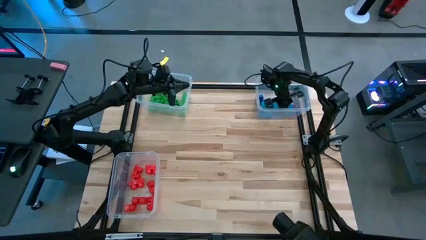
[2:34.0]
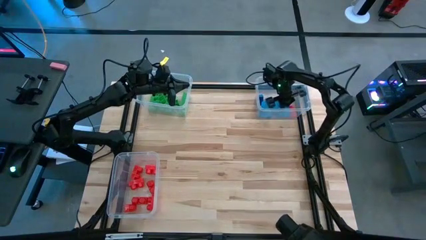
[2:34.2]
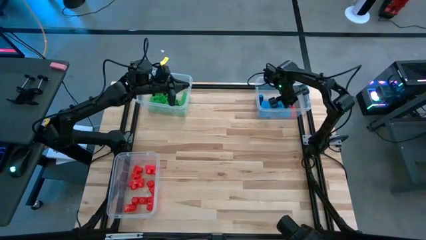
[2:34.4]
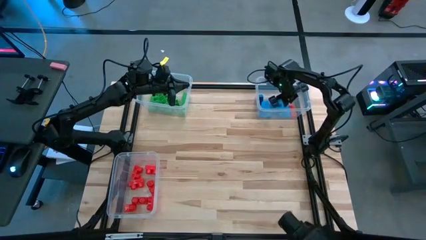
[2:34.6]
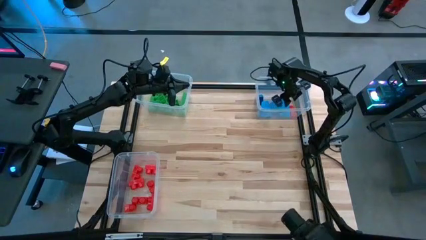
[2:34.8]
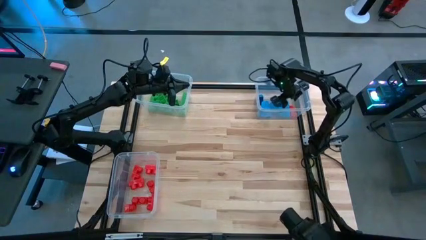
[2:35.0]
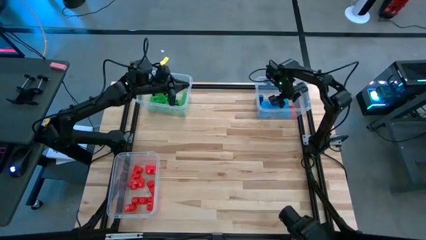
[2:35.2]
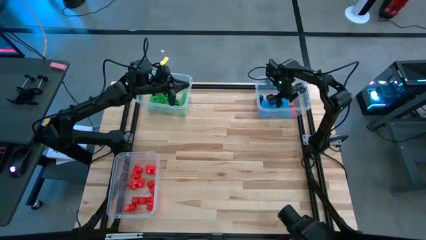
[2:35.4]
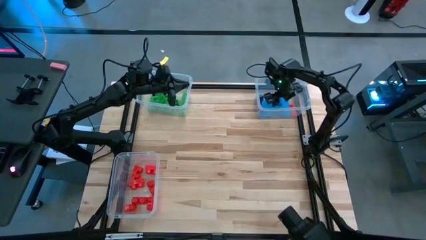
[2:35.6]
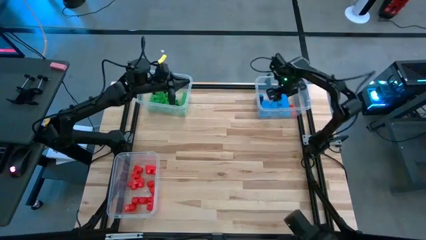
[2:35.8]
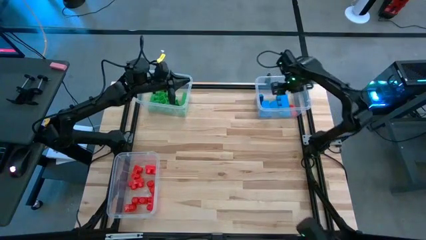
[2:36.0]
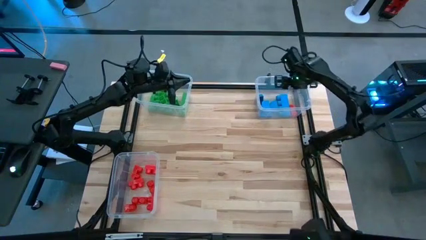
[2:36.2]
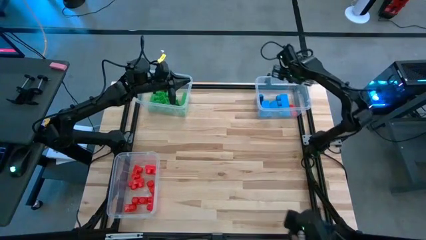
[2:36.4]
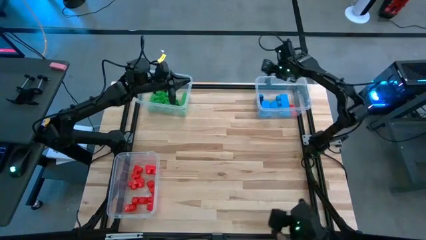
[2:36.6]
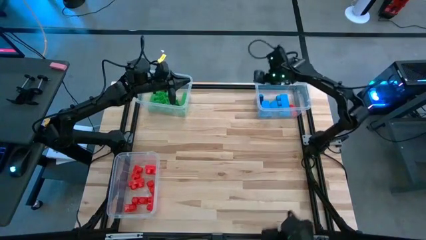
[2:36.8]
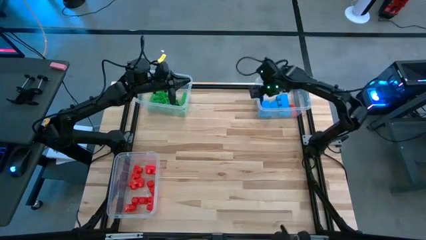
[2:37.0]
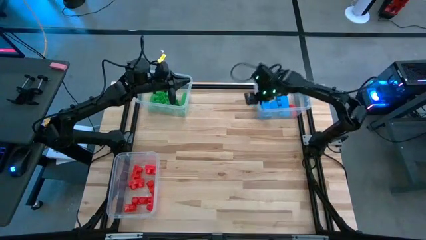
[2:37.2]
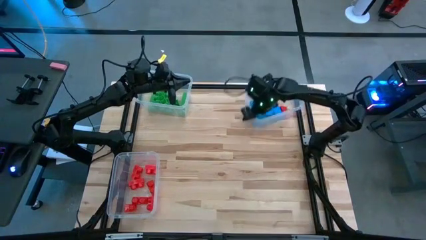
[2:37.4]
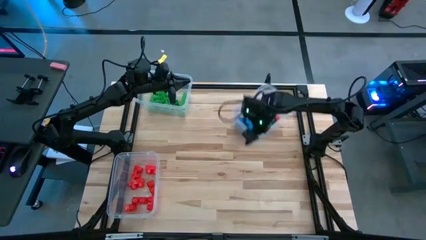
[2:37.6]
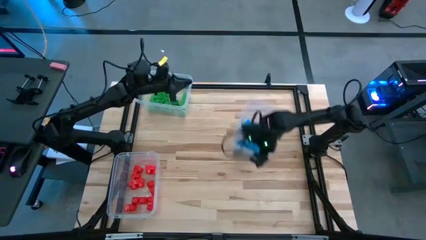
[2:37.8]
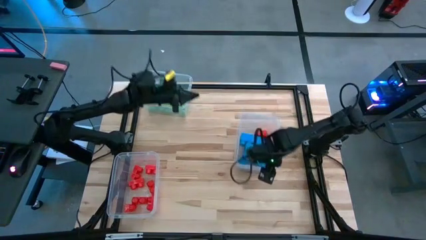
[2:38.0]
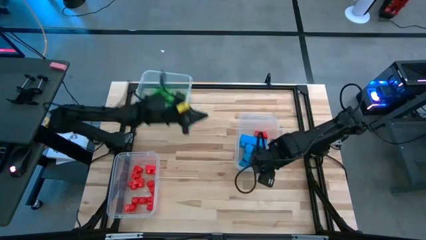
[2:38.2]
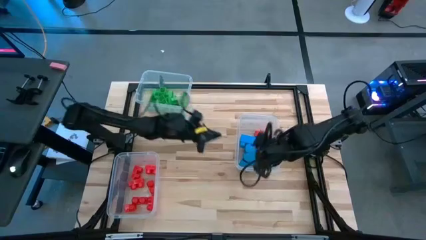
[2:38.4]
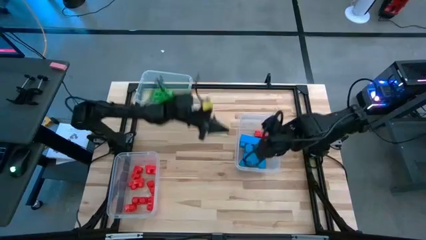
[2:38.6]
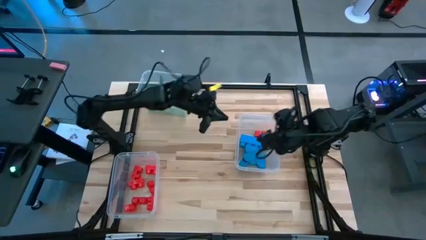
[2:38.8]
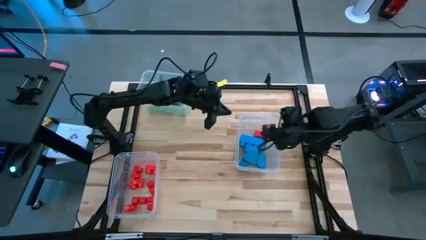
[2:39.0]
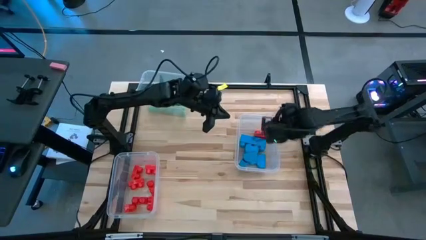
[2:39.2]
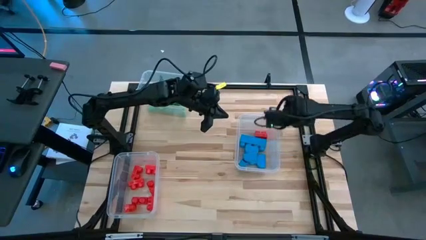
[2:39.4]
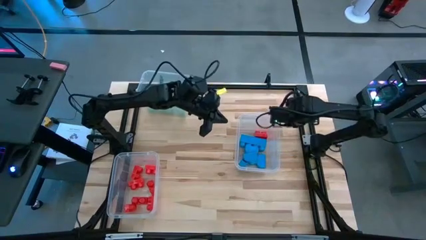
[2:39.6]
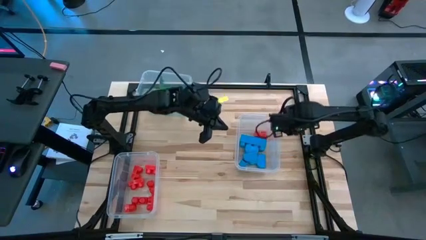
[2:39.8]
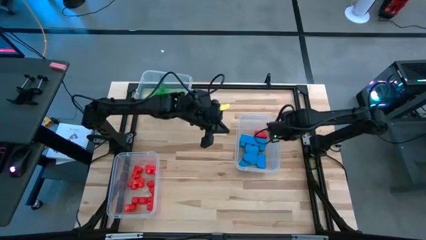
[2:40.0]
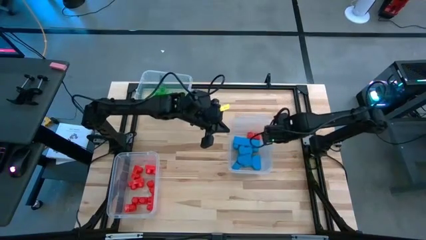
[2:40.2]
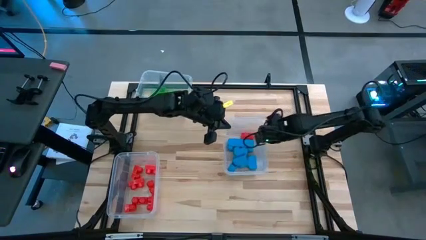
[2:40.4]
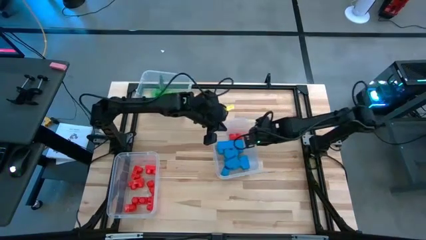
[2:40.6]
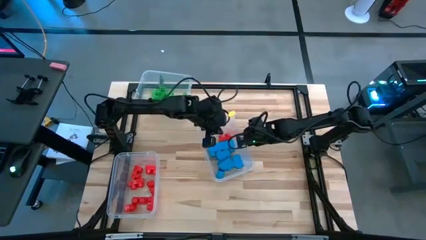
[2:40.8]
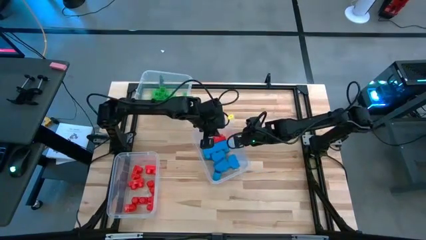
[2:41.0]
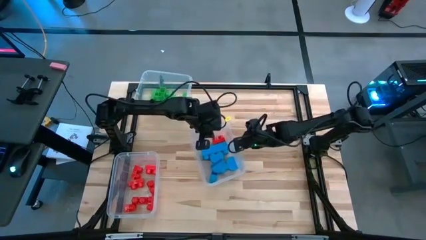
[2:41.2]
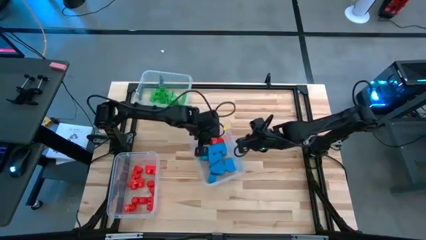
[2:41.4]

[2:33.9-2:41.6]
Task: Sort blocks
Move the top right transparent bin to the center of the table

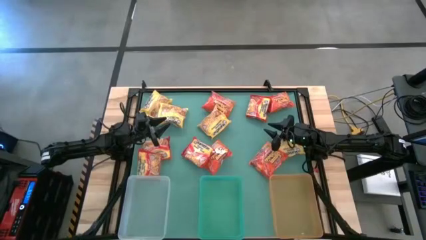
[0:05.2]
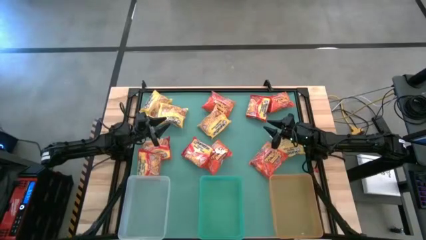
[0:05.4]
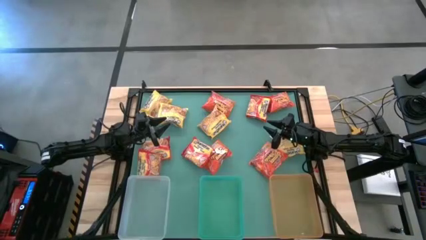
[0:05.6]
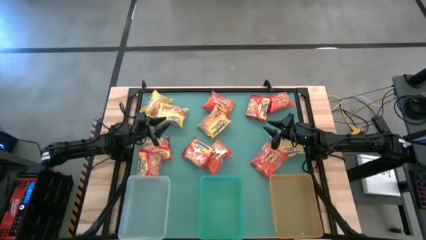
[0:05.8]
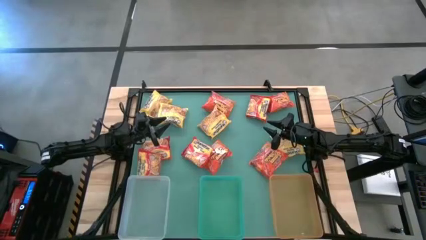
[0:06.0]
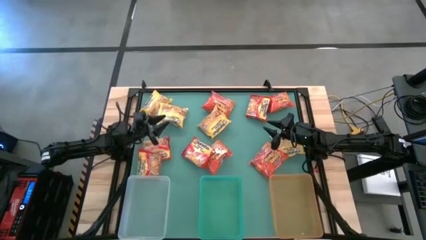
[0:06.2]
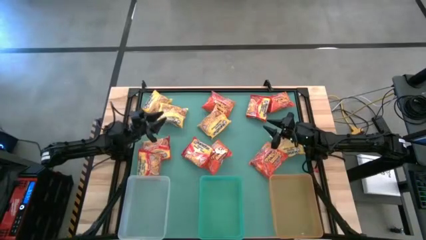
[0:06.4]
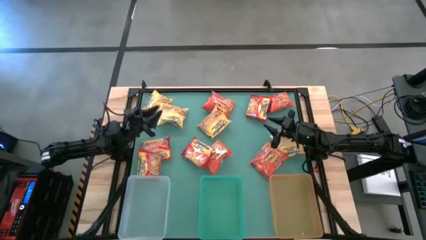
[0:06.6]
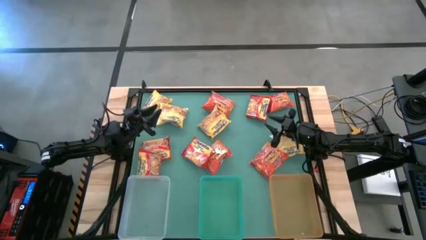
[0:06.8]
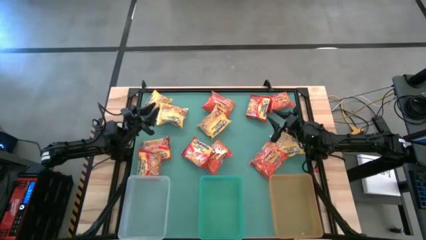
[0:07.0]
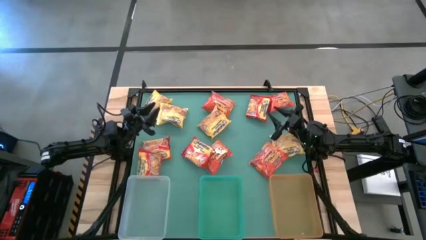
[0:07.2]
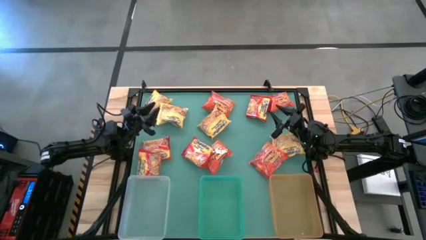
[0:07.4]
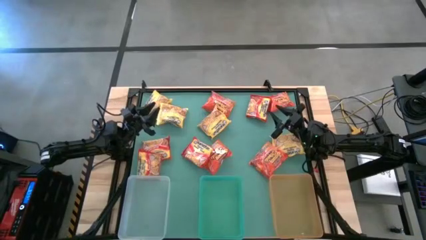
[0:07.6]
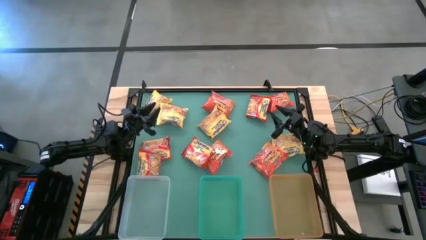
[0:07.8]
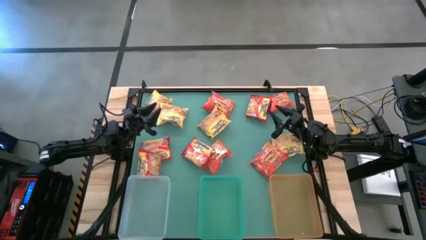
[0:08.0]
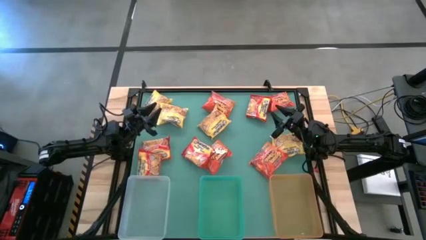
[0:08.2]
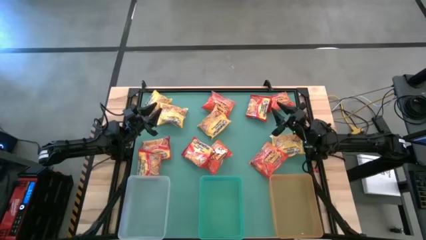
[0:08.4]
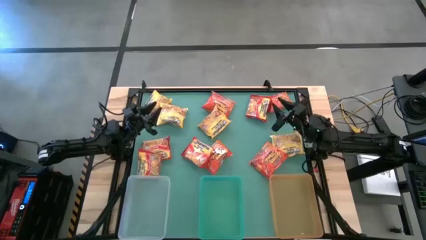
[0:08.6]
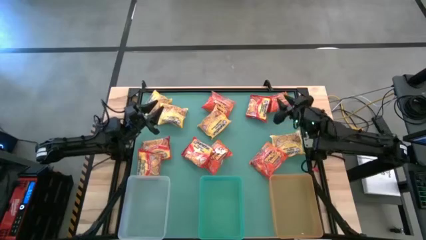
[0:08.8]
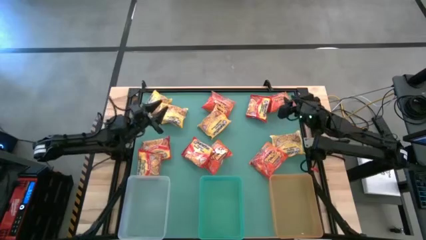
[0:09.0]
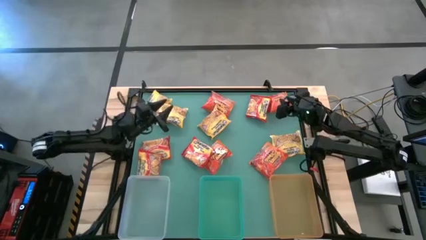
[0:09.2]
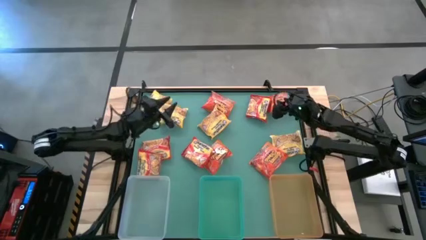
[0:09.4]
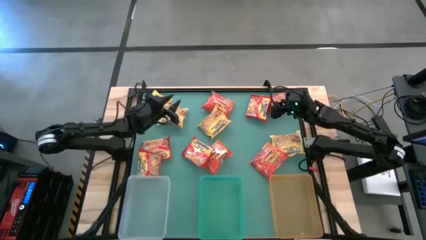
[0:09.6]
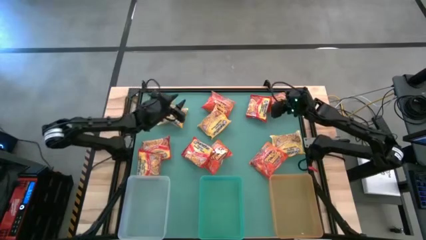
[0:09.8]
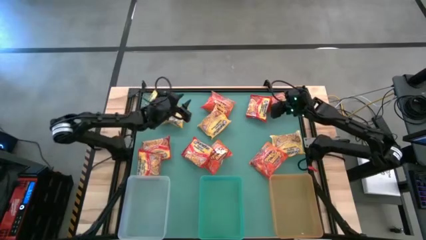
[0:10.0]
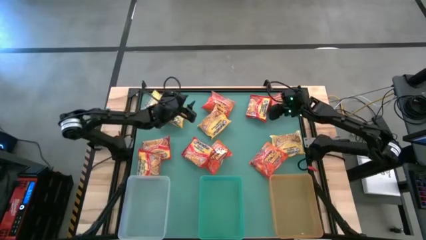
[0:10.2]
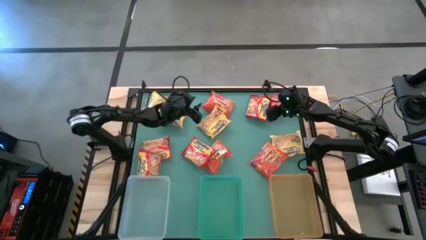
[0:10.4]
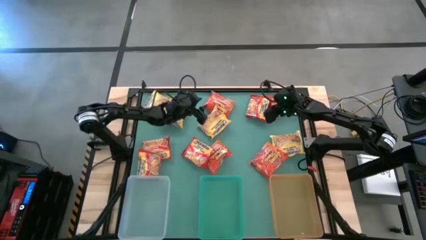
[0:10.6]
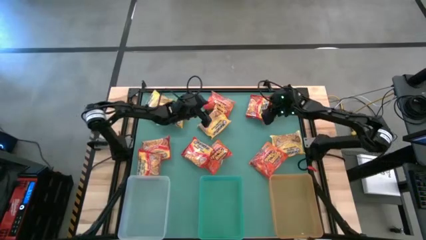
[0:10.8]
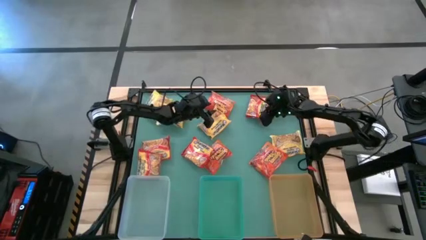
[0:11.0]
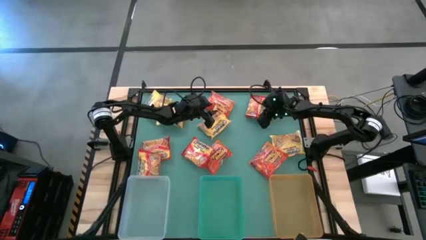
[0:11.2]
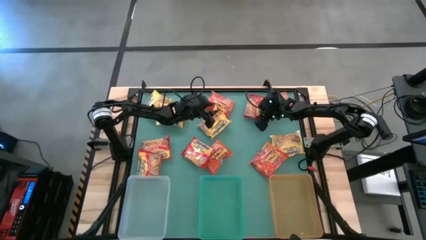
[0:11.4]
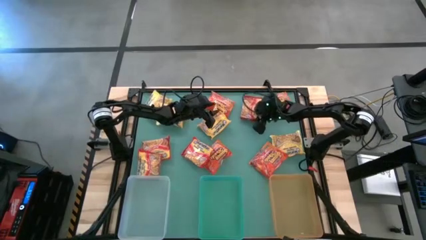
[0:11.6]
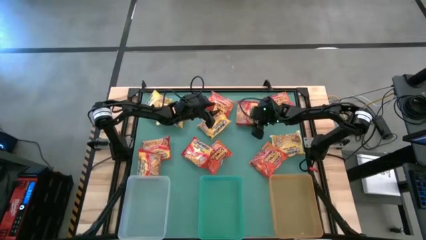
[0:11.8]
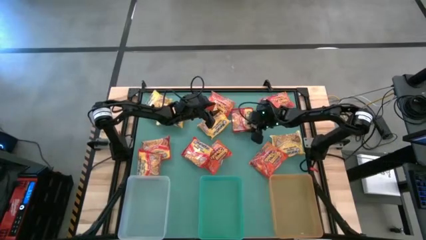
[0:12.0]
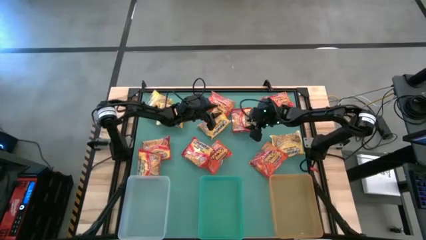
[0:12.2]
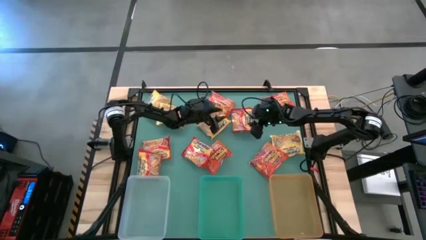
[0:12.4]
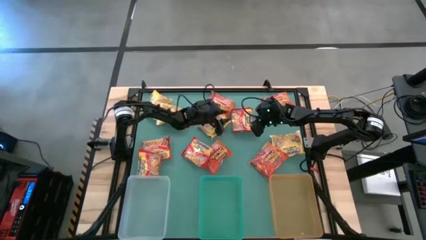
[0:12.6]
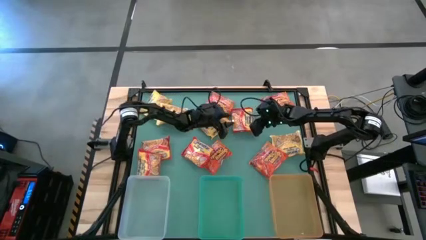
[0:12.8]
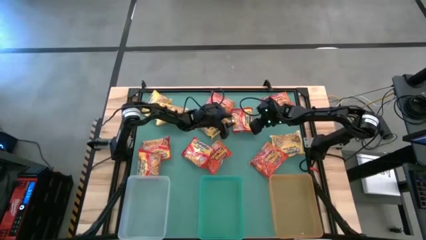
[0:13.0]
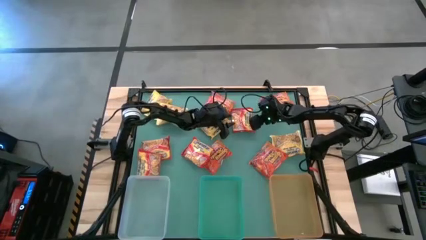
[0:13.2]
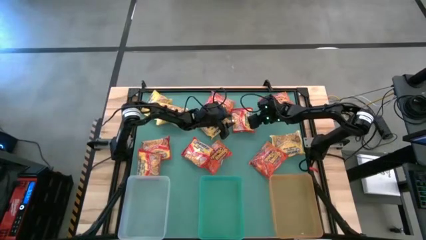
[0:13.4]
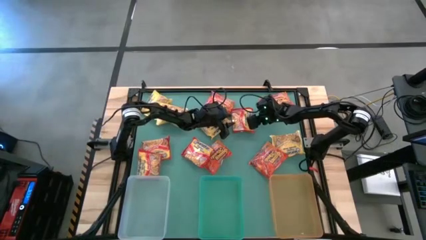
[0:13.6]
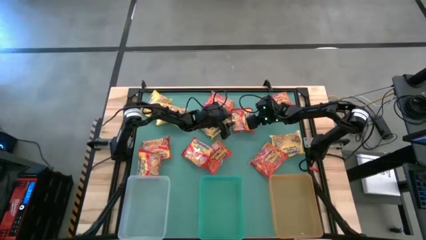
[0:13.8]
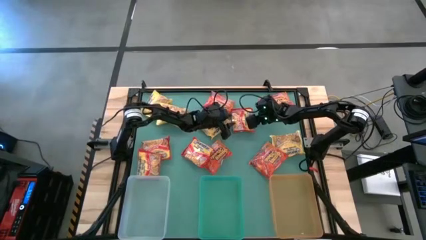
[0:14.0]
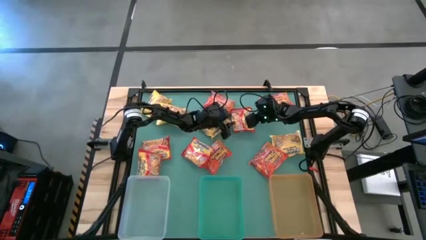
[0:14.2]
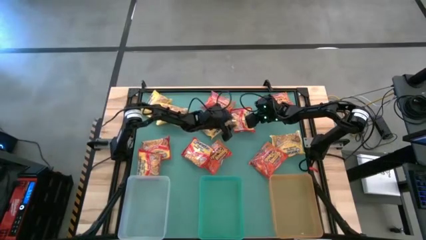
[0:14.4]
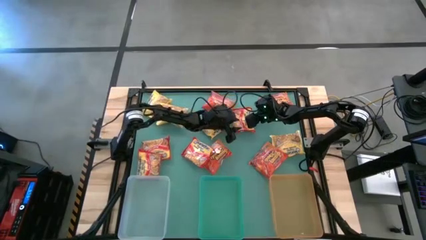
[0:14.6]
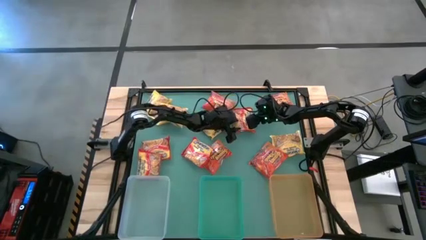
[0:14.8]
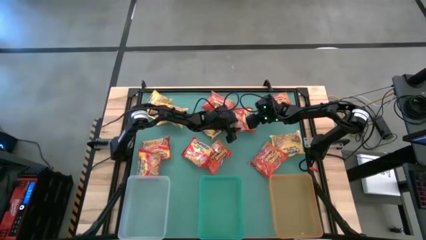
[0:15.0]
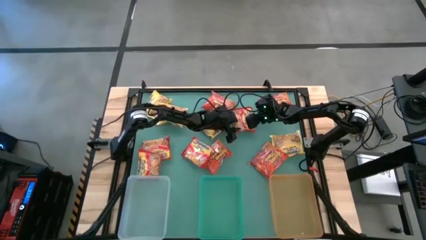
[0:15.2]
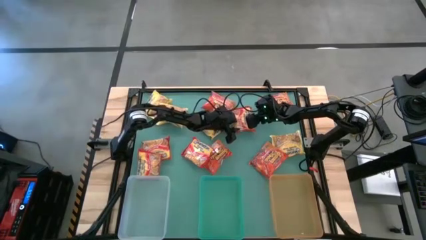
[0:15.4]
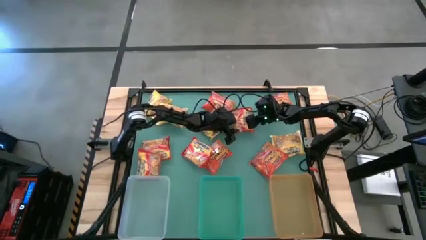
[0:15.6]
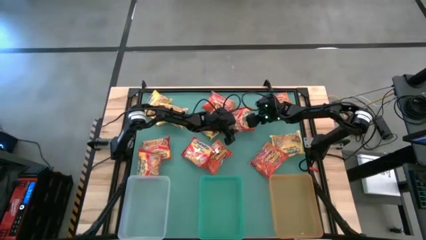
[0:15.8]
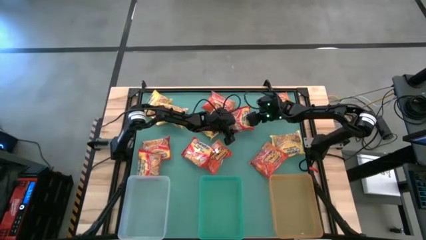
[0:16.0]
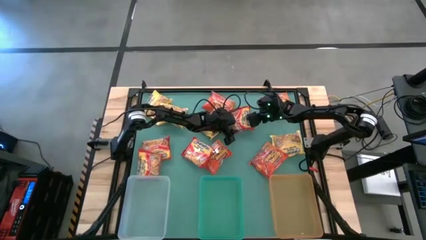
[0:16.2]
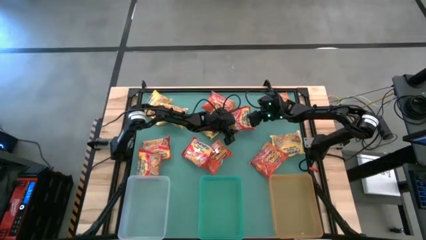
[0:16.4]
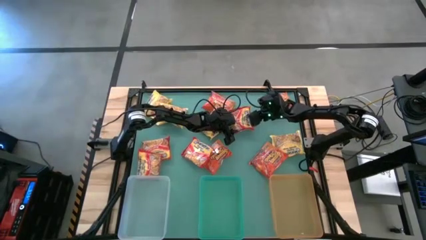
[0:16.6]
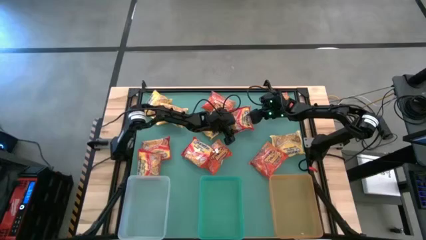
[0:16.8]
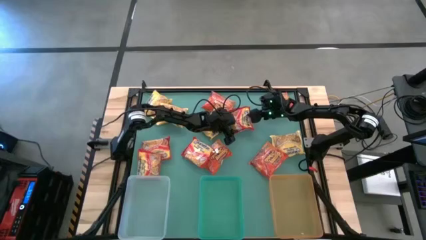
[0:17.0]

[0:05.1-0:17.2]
Task: Sort Maruchan noodles
Put the red noodle pack into the orange bin
